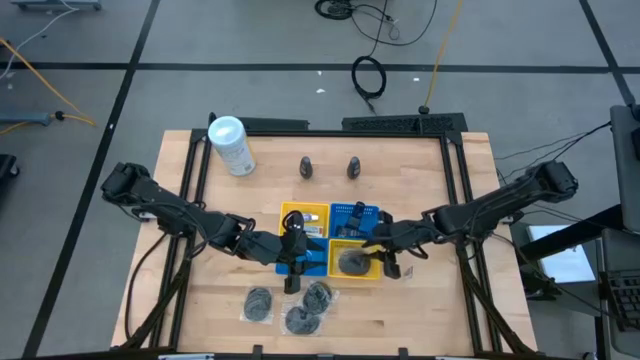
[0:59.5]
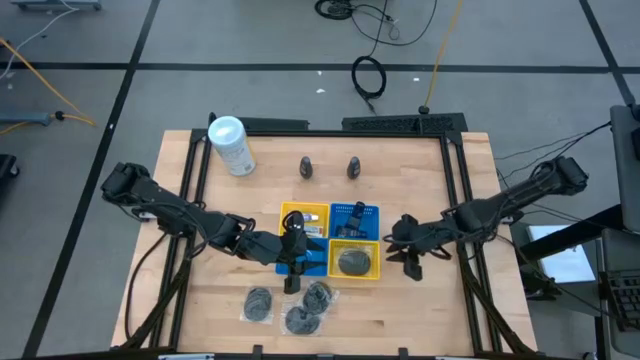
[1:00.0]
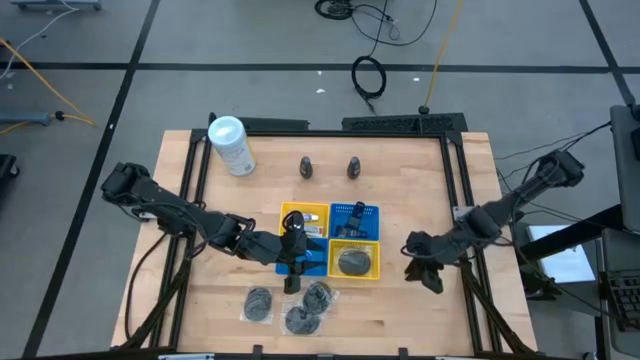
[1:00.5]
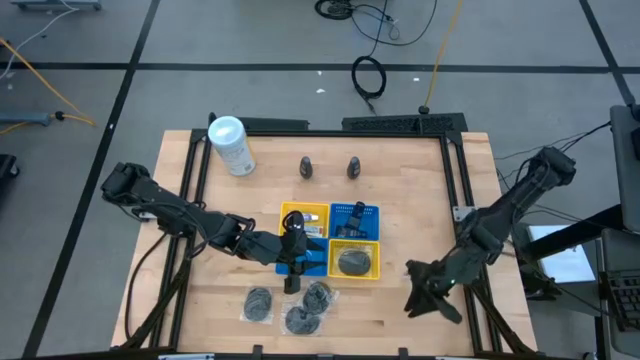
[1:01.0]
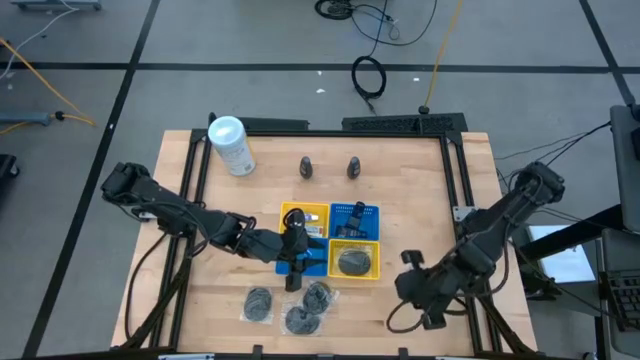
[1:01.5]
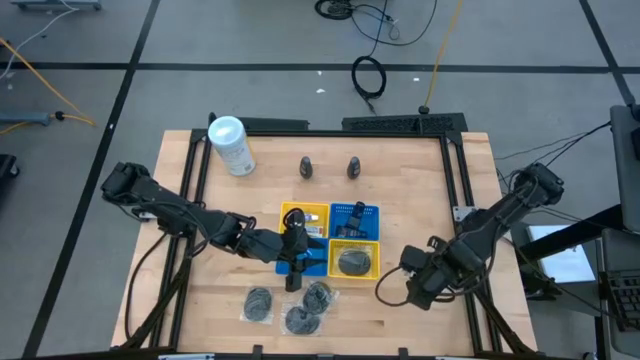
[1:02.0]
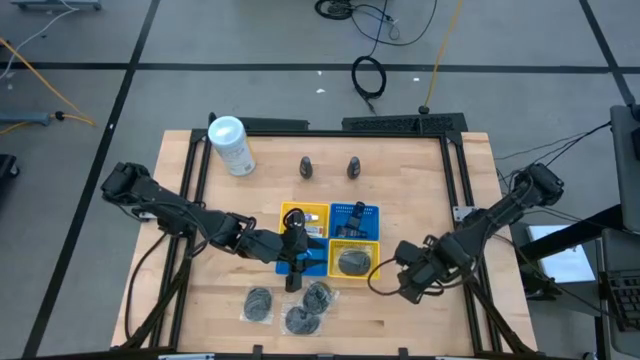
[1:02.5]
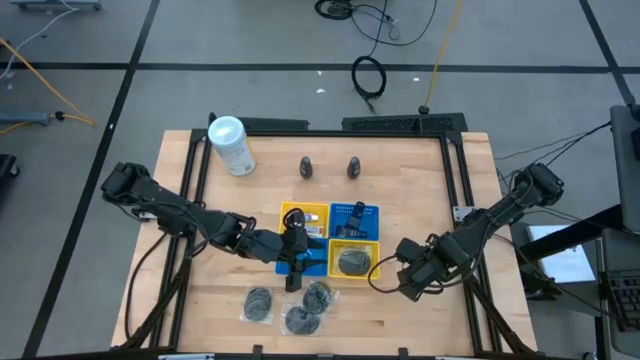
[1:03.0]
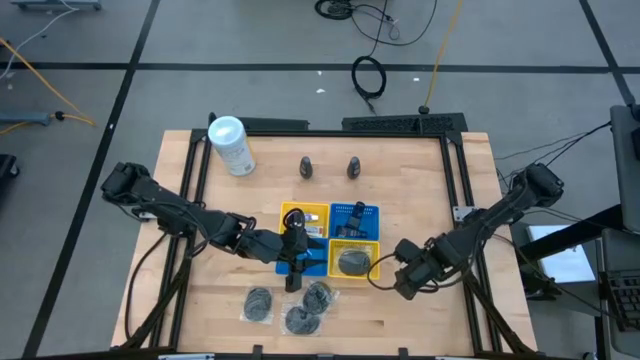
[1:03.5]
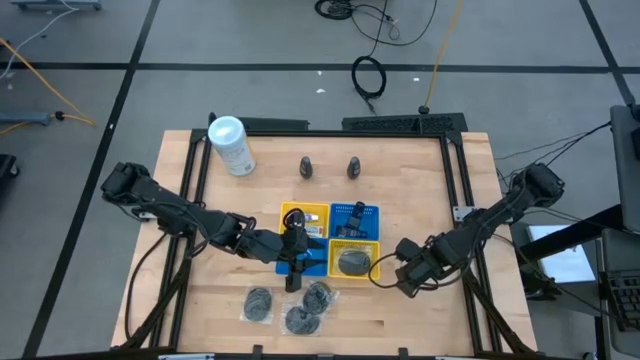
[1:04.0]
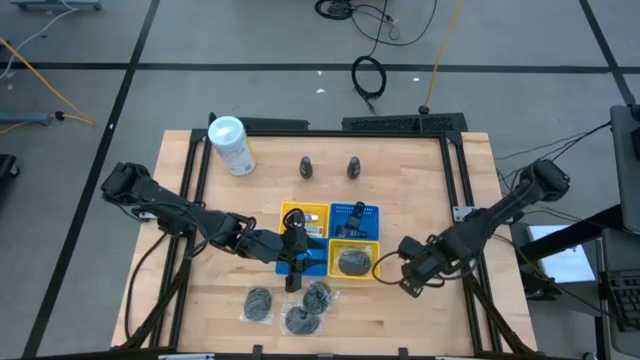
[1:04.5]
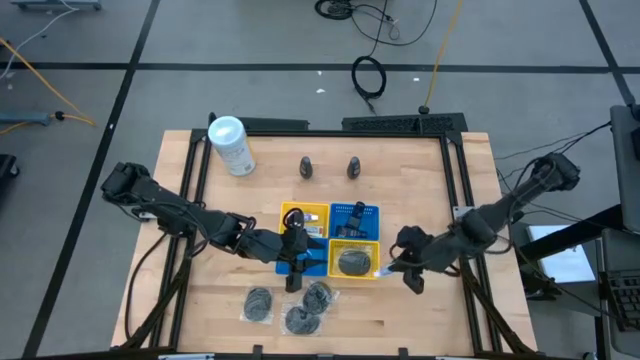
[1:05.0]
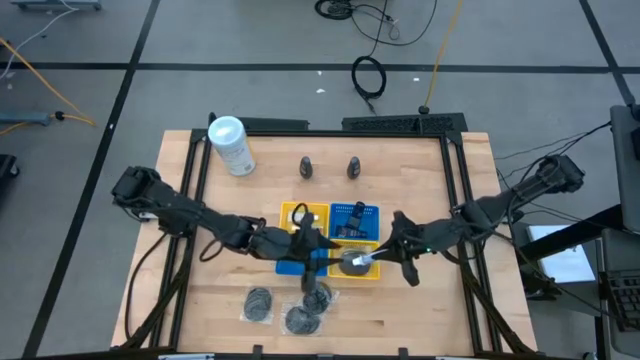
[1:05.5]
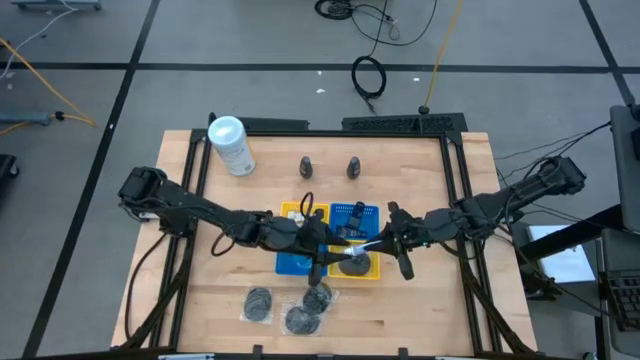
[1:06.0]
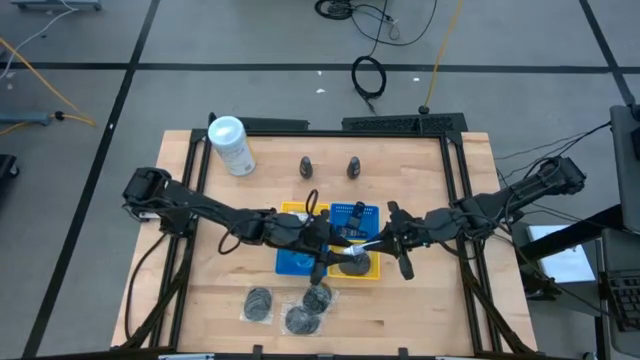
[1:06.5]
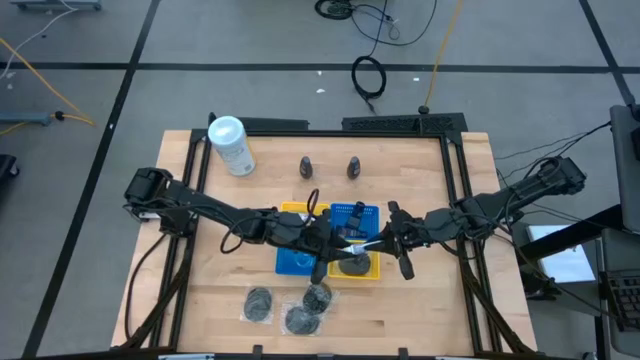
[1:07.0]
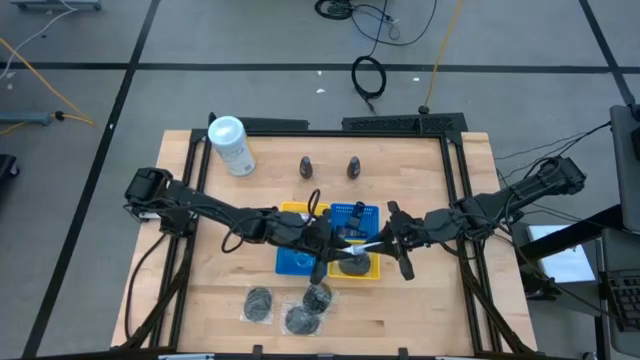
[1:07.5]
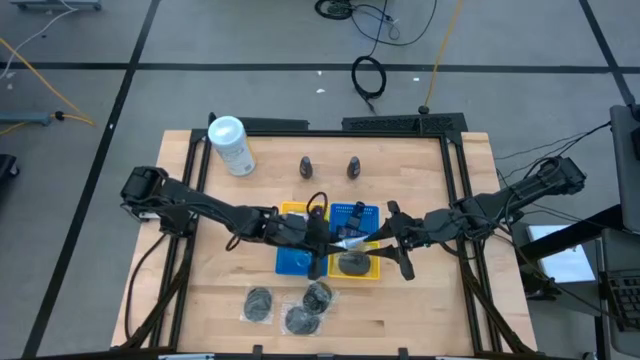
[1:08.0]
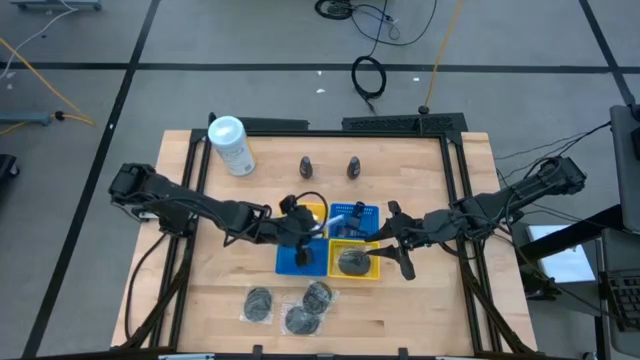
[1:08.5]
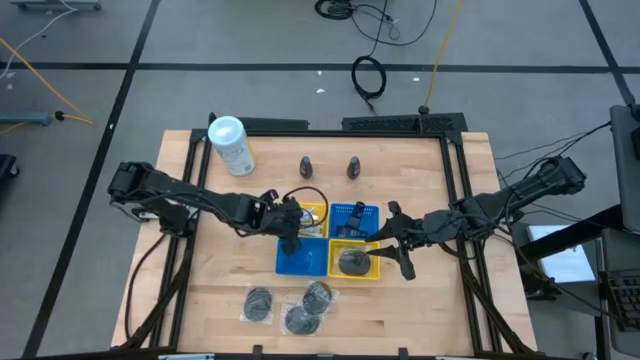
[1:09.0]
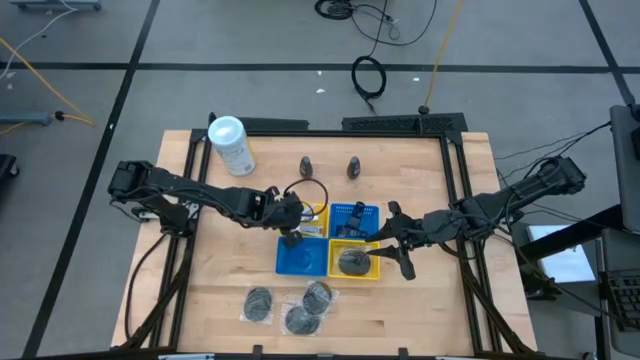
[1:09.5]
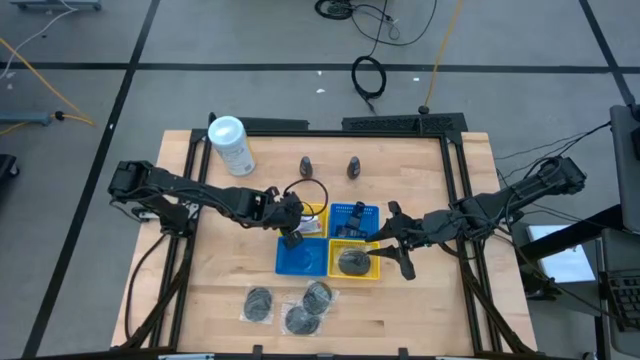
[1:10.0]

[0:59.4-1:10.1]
Task: Pick & Place Travel size toiletries
Put the white toothpaste into the left yellow bin

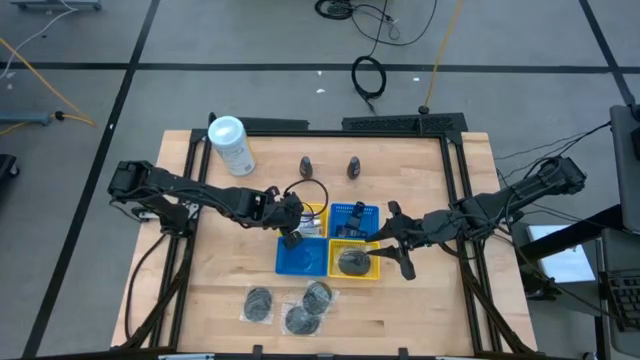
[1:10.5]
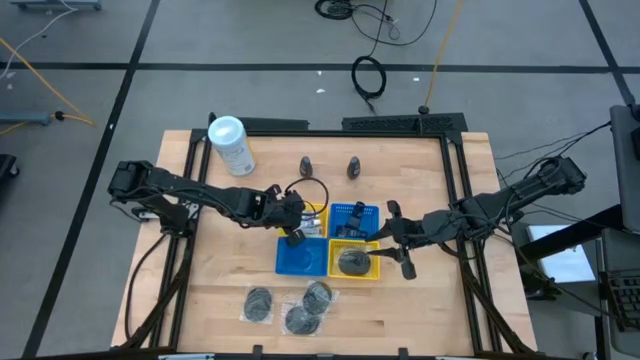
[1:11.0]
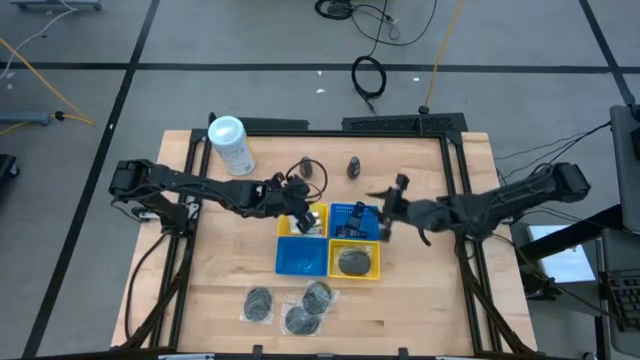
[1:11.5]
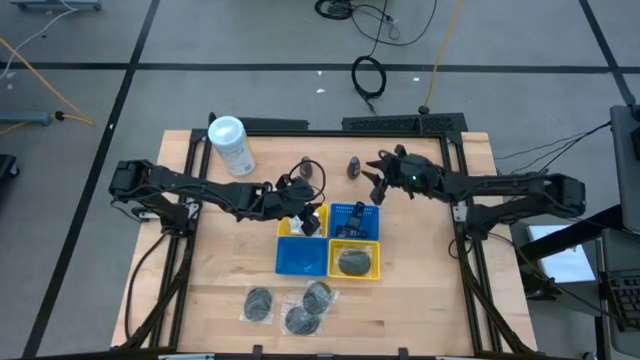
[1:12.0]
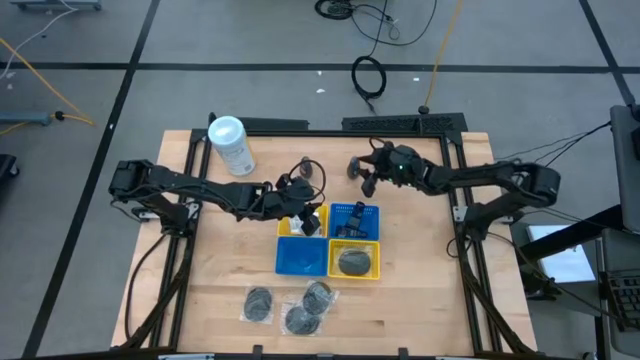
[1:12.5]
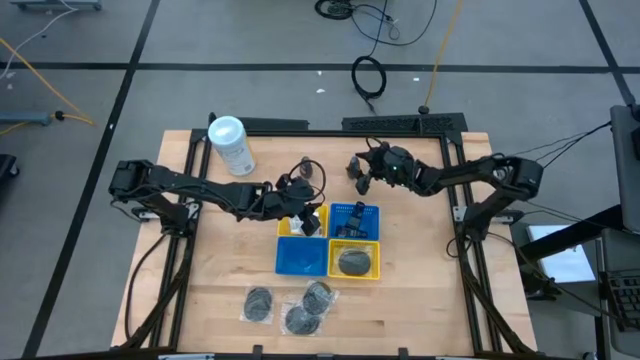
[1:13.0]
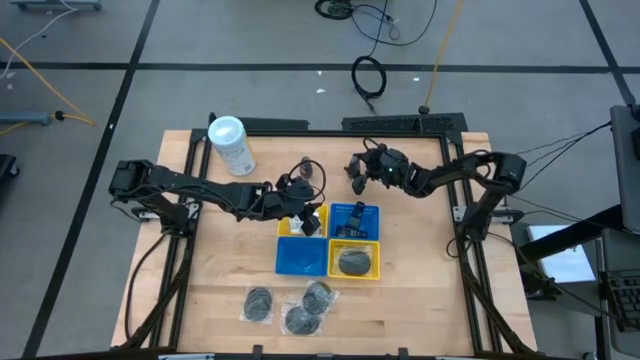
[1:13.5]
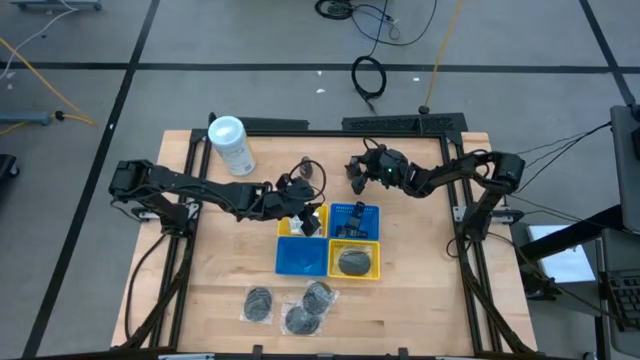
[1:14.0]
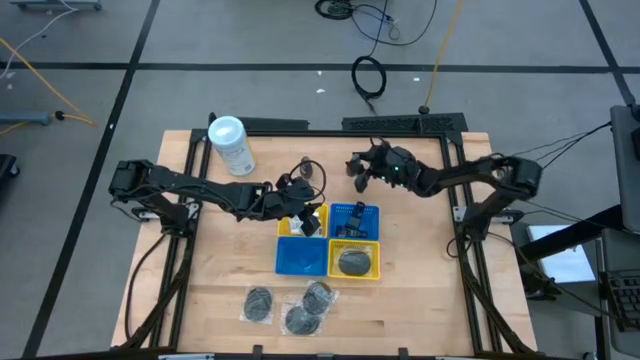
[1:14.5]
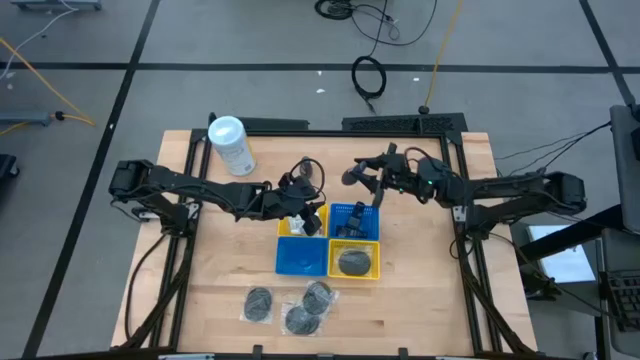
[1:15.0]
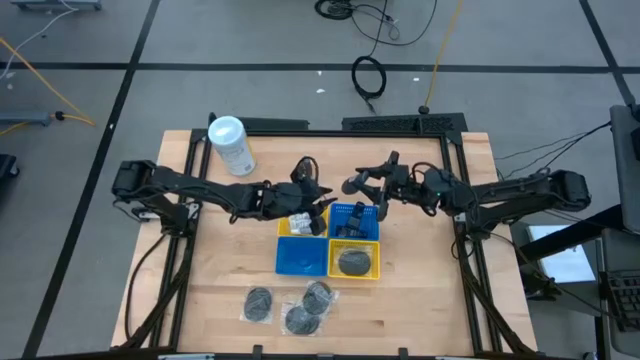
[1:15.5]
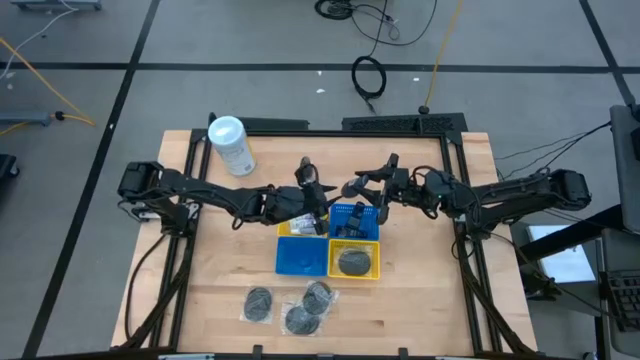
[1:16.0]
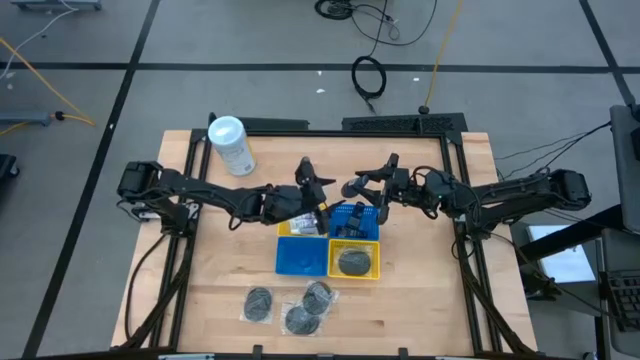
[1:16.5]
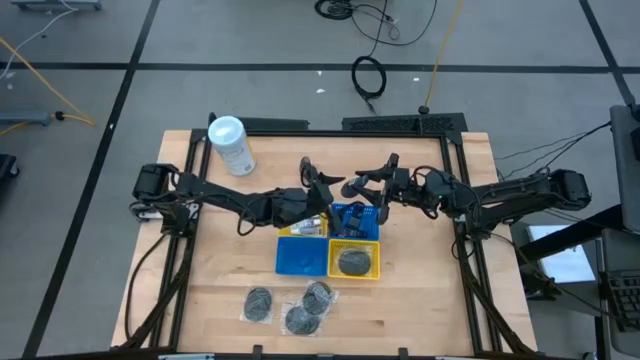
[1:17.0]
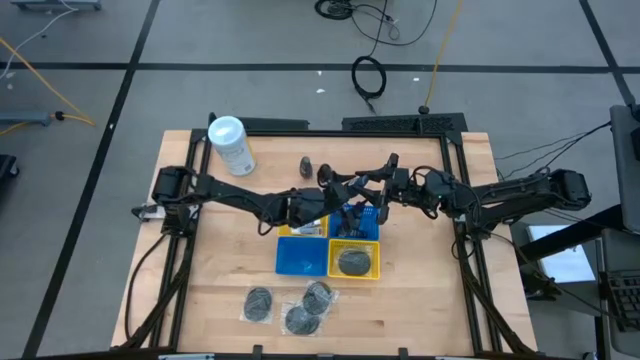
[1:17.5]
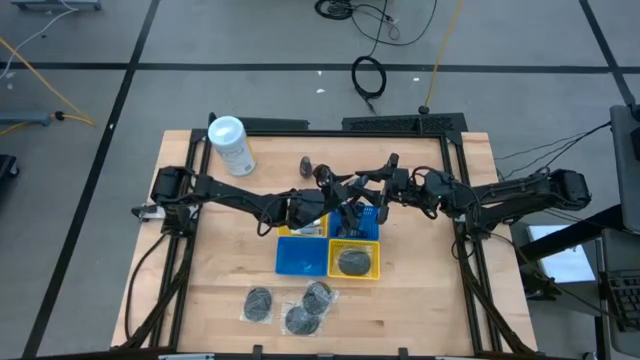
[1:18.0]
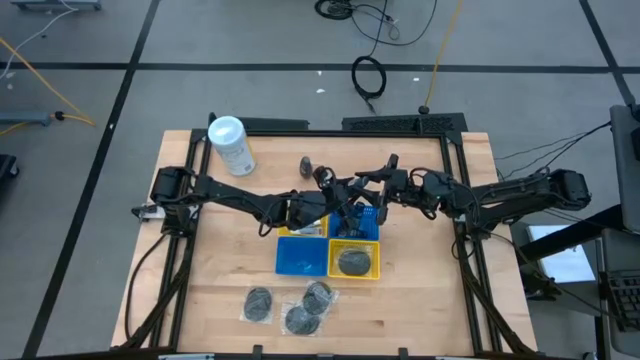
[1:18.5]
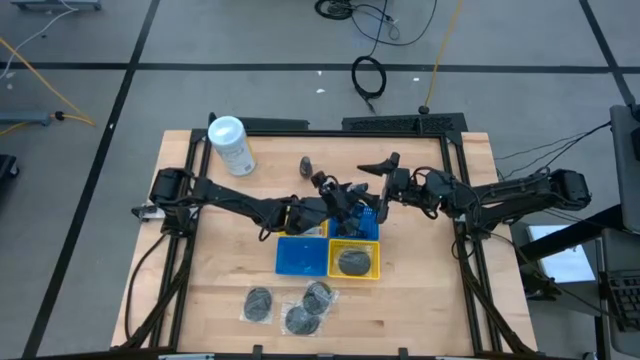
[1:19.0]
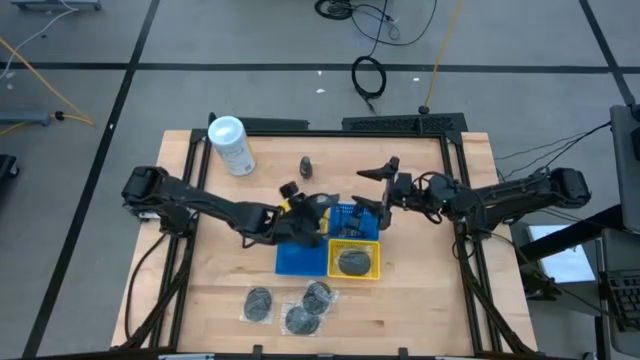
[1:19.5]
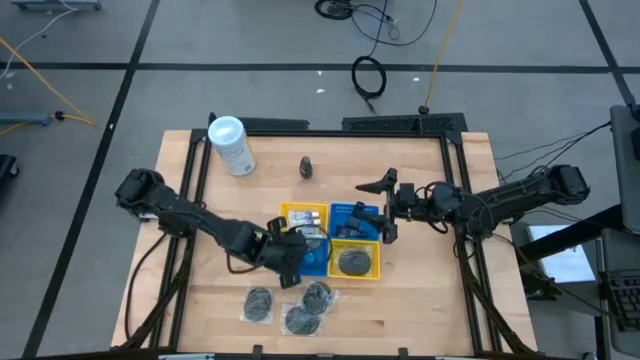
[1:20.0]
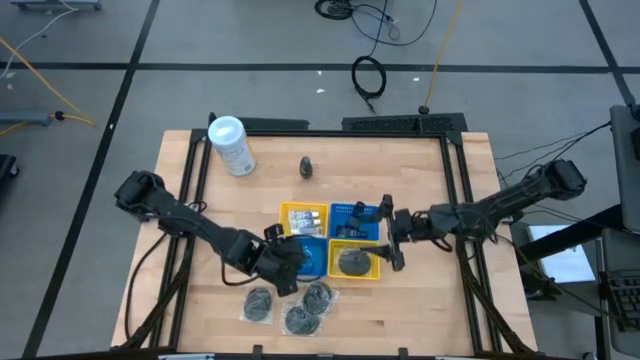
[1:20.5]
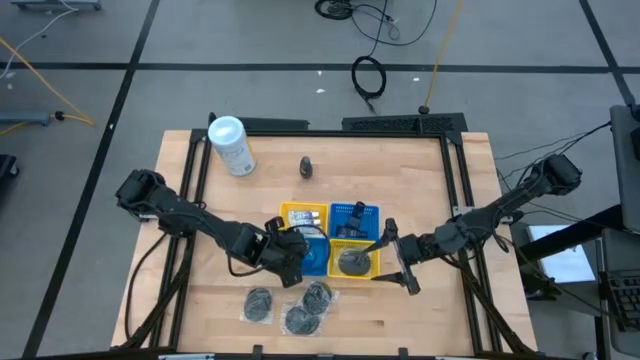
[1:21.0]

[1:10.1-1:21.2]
Put the gray deodorant into the left blue bin
